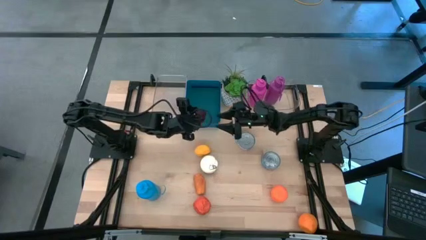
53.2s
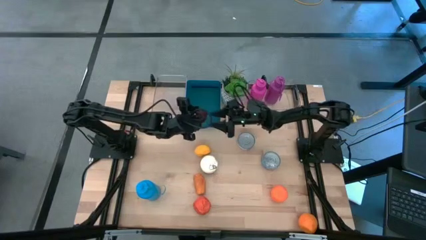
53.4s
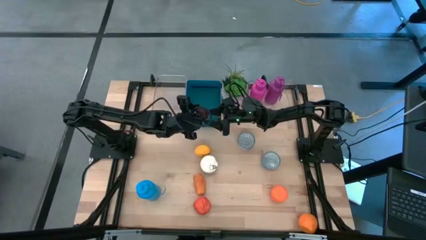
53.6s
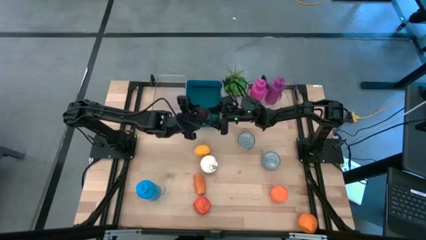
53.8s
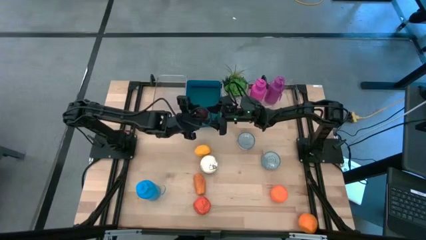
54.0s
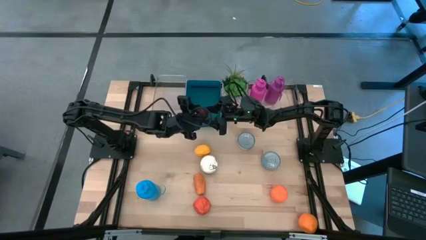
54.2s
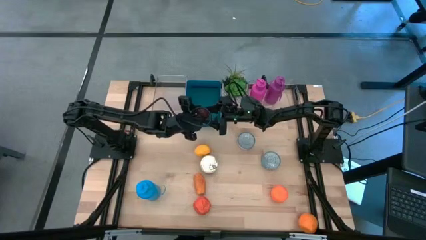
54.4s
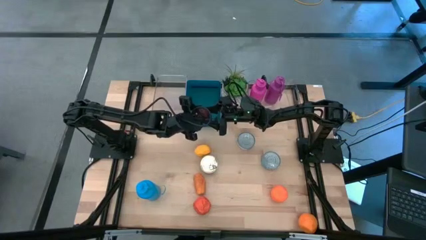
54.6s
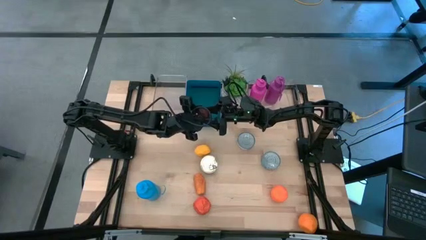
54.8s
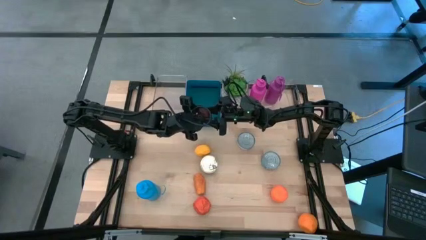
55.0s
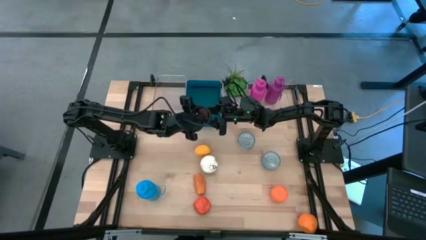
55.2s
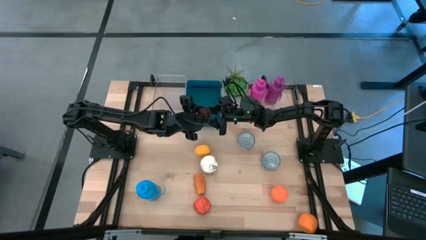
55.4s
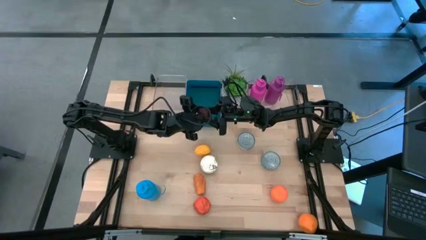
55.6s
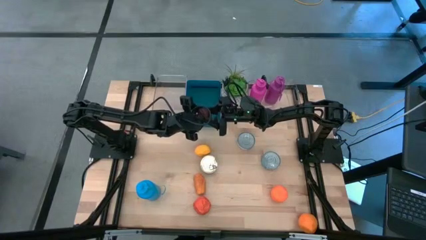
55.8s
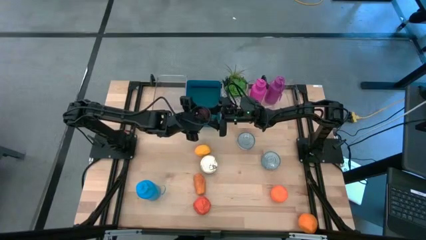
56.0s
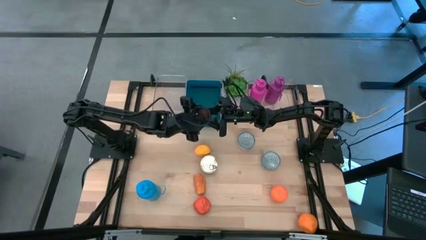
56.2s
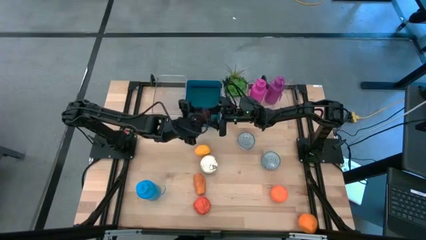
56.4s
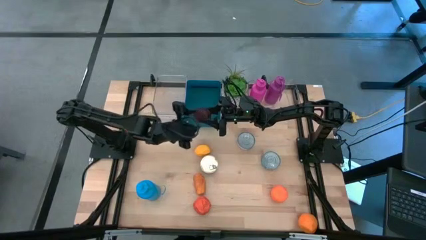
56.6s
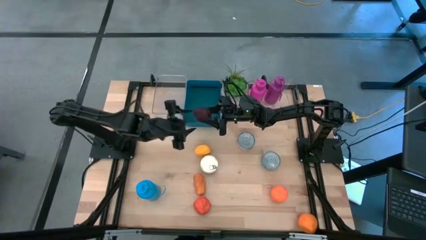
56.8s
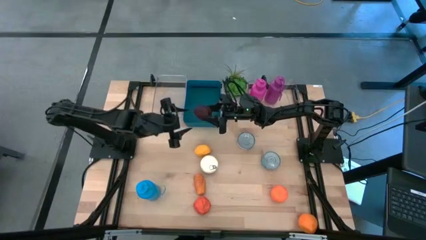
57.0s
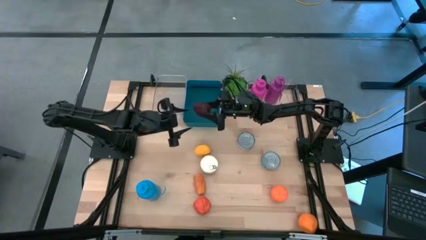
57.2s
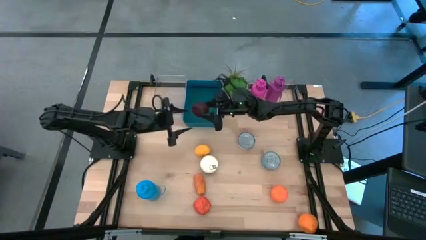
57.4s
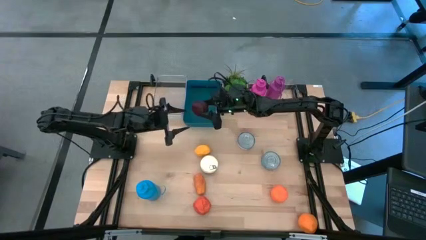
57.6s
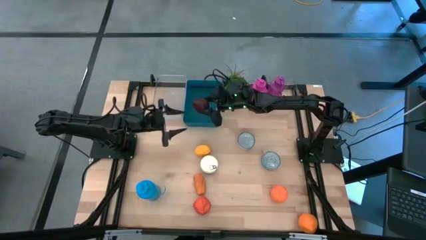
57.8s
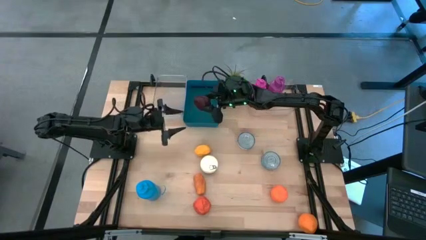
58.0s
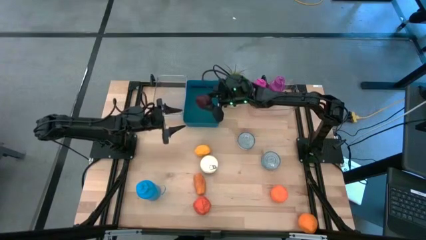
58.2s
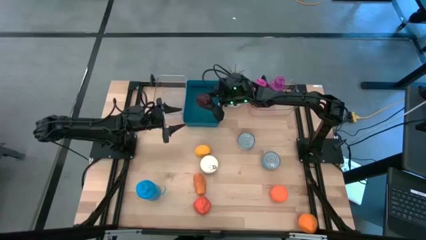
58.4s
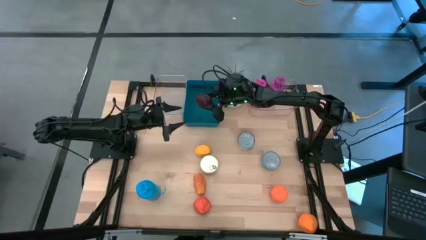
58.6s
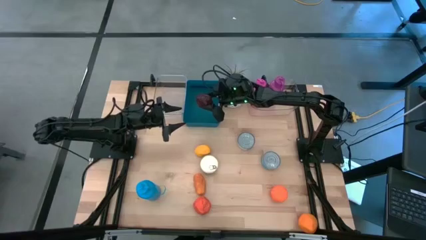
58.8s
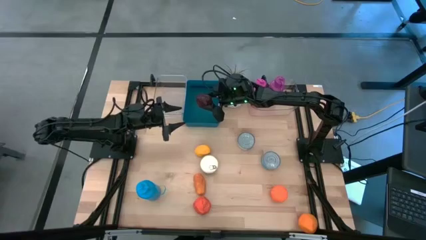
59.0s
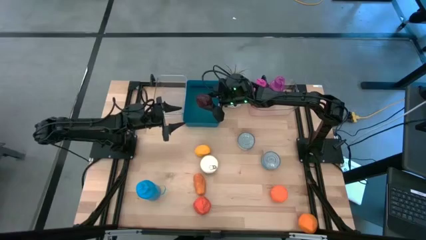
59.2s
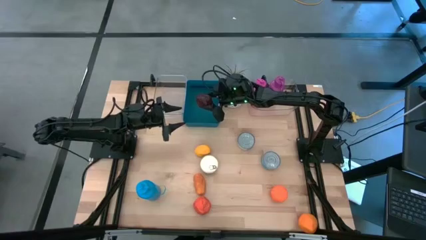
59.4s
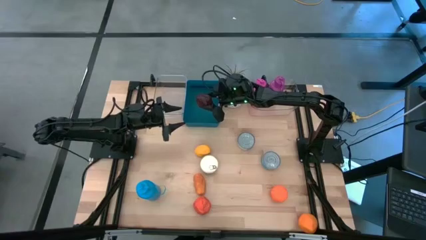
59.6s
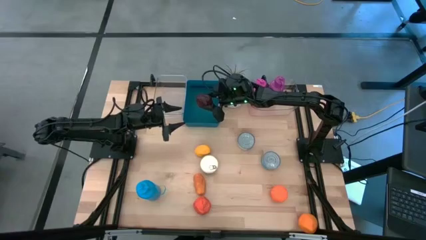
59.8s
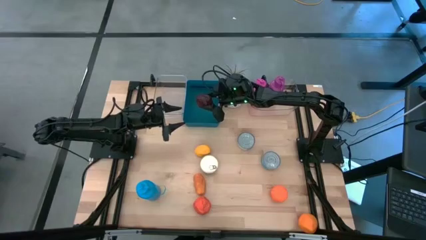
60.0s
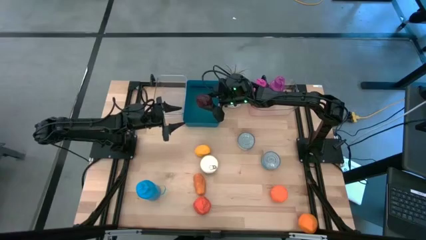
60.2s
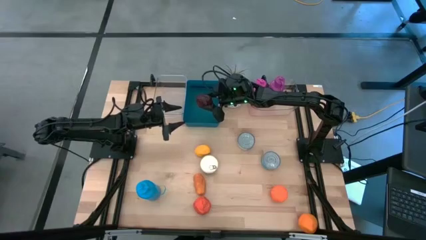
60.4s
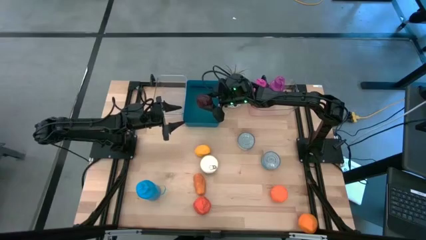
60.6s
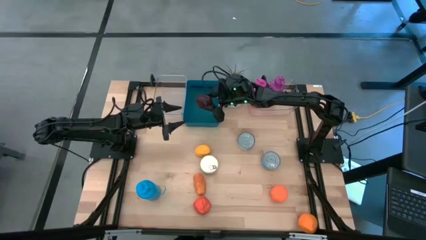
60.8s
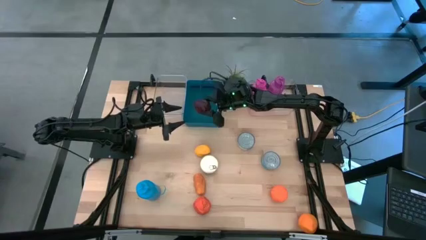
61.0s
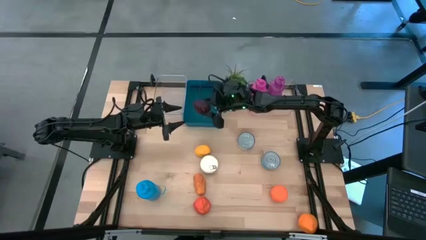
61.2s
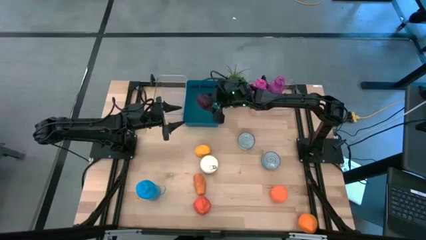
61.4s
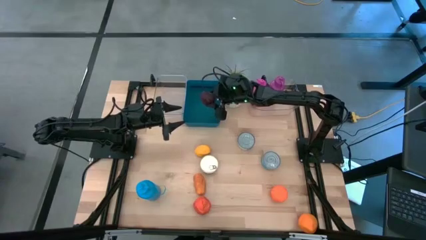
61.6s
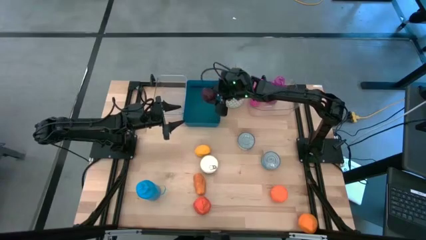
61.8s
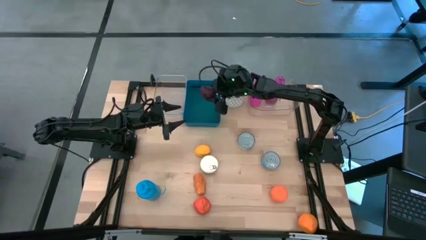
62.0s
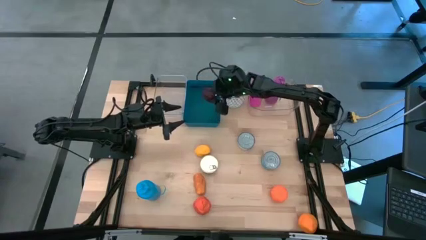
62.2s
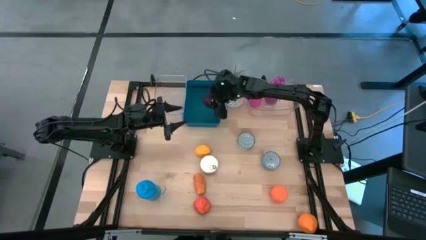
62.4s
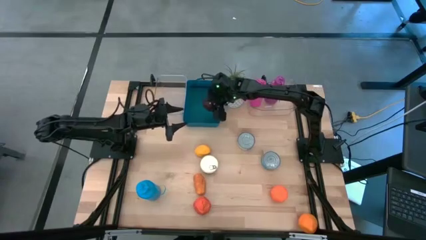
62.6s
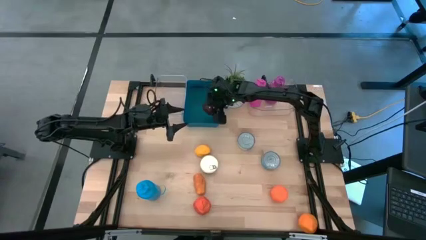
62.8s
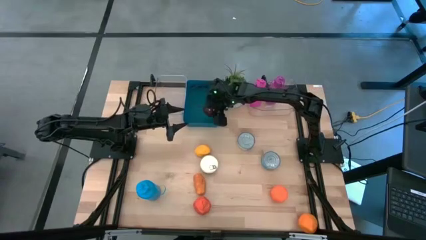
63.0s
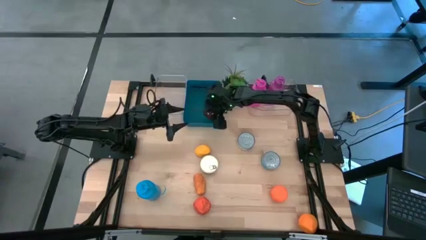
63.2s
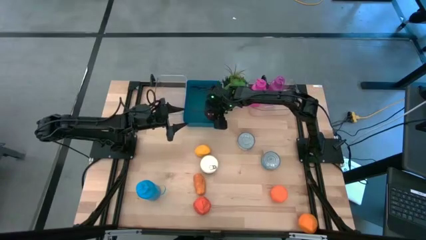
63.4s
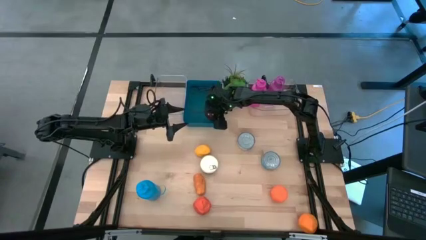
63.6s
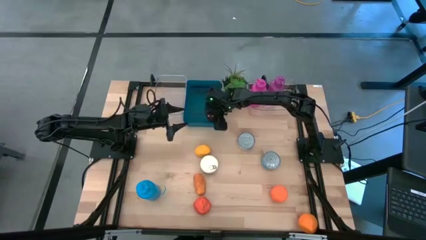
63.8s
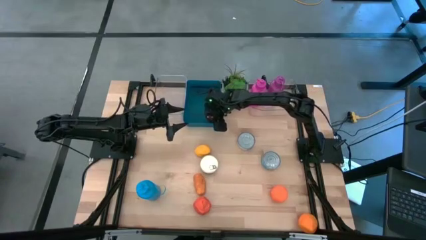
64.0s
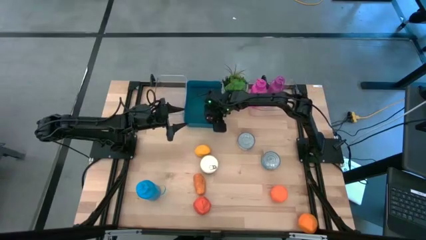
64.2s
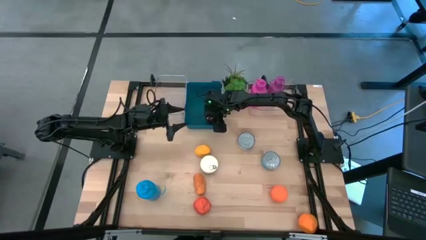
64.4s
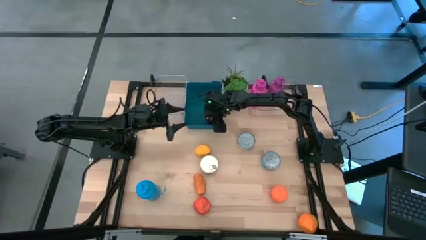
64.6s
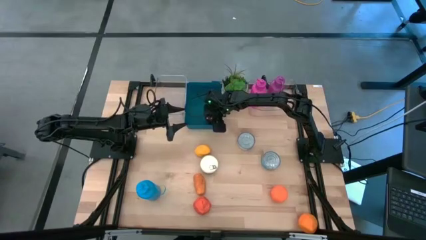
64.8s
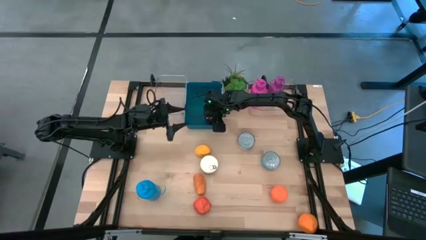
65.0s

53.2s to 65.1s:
Task: Pick & Place Food Item
Put the apple into the blue bin

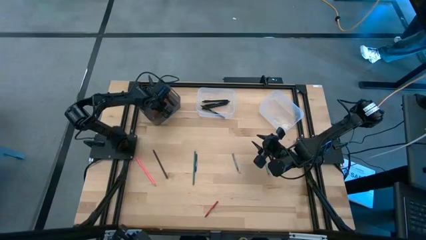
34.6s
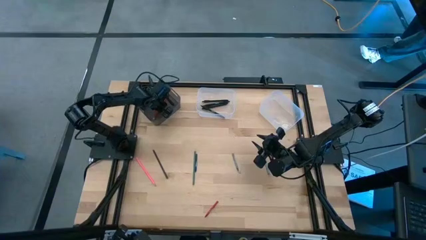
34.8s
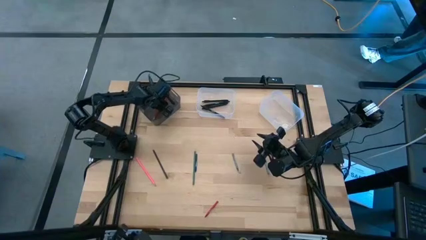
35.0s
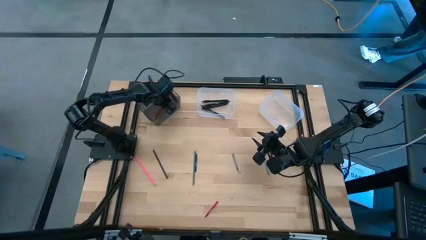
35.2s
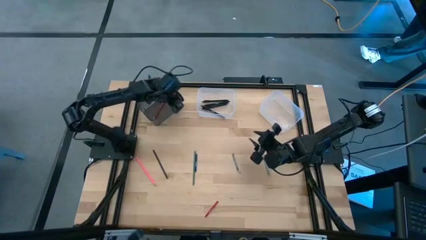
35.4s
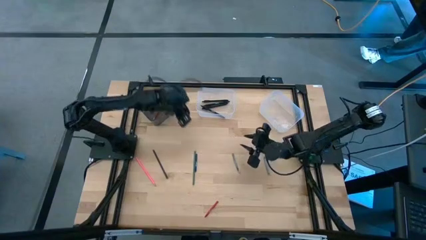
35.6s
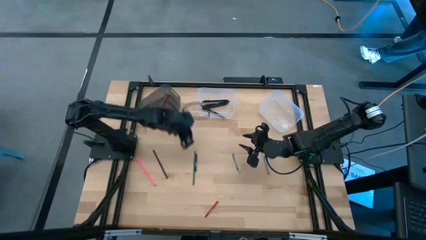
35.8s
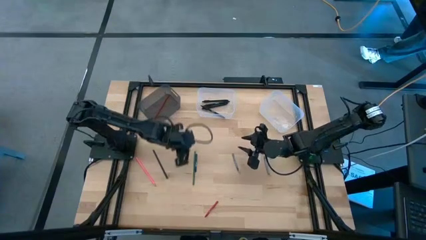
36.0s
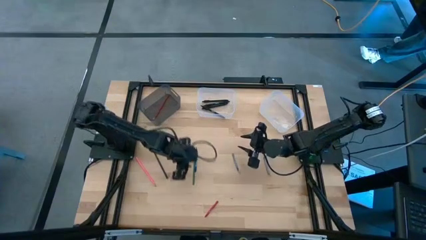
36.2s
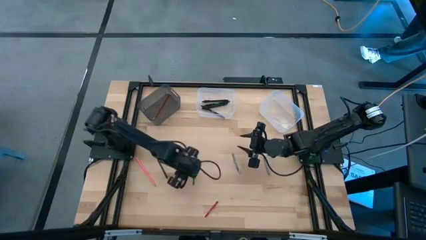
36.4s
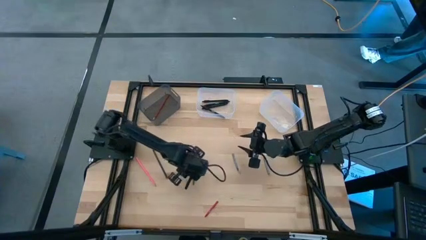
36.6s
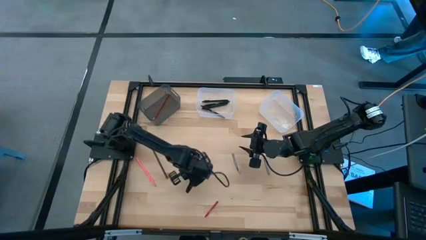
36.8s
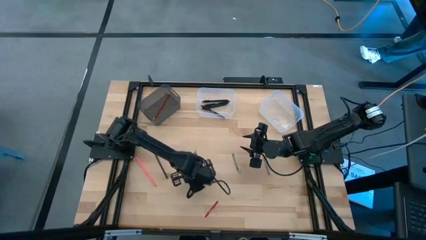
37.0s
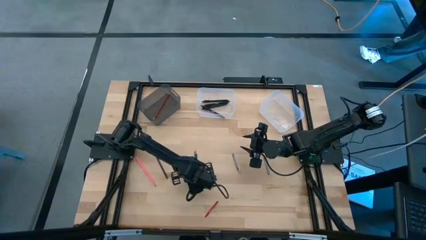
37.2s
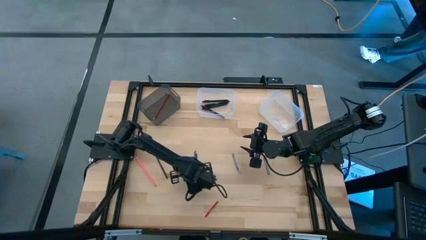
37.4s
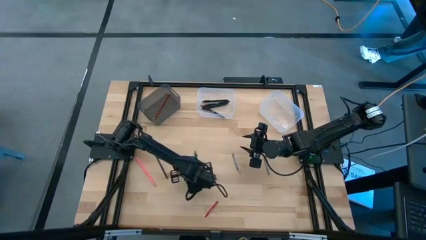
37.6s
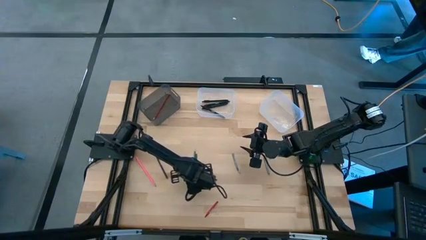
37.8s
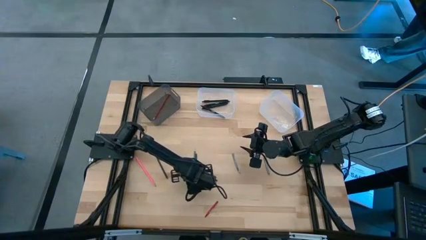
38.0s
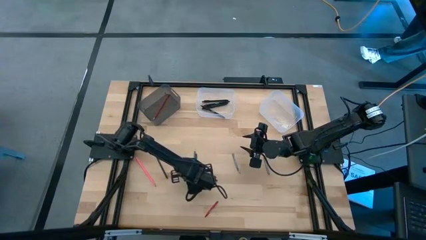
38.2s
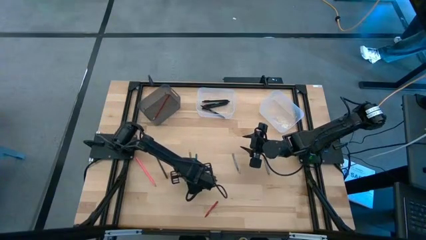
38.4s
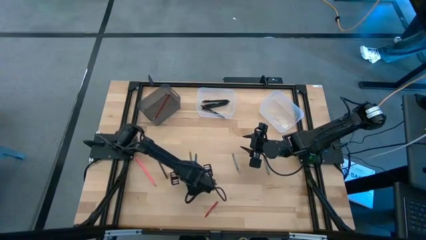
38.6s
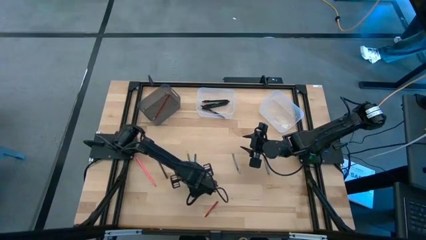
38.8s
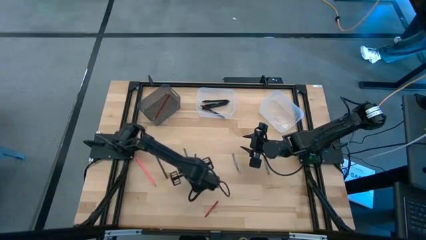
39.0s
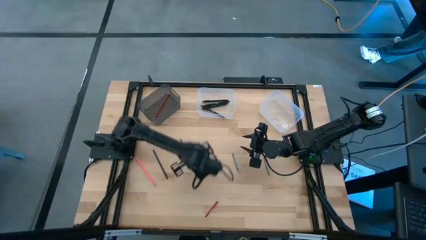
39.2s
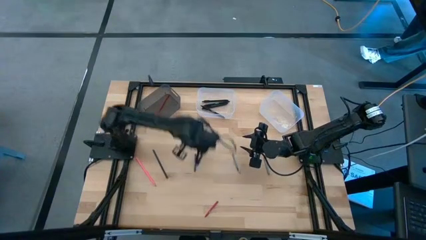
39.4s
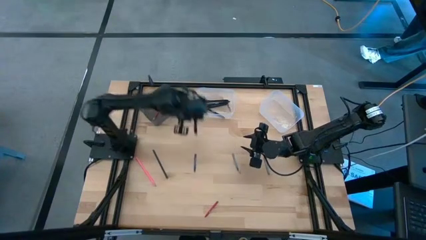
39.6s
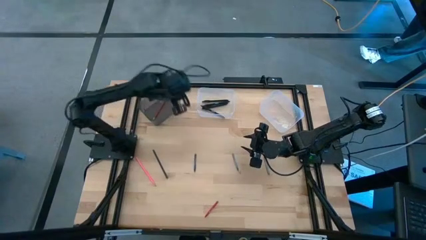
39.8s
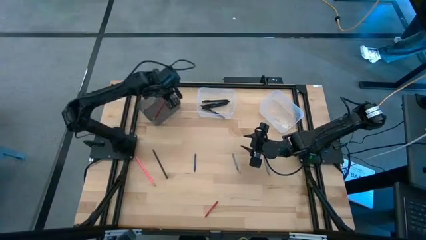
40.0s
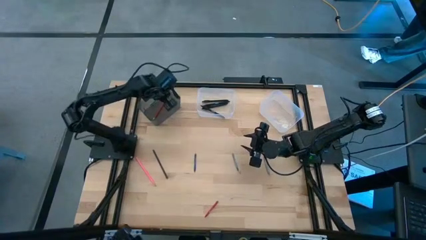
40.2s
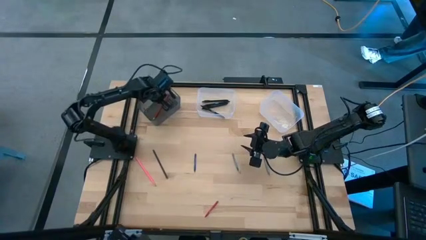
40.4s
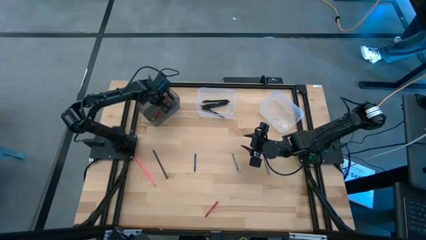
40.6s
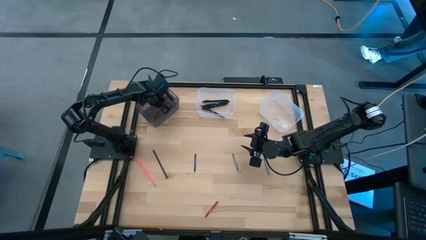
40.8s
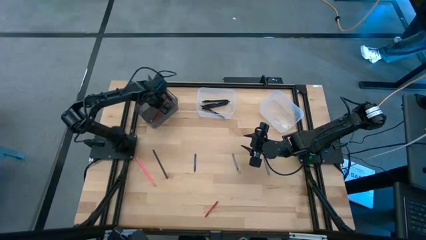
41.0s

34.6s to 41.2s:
Task: Sort crayons/erasers/pens/pencils in bins
Put the green pencil into the black bin
